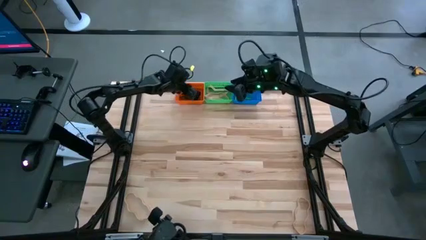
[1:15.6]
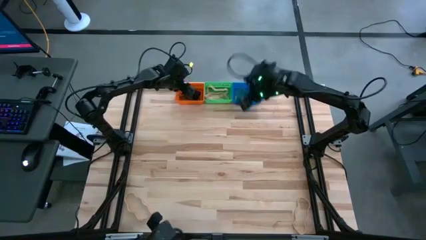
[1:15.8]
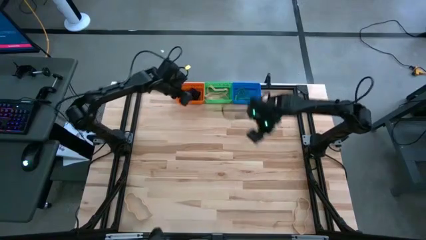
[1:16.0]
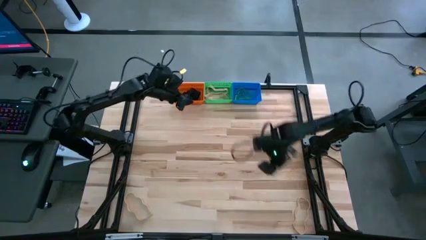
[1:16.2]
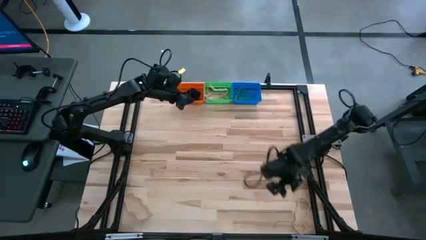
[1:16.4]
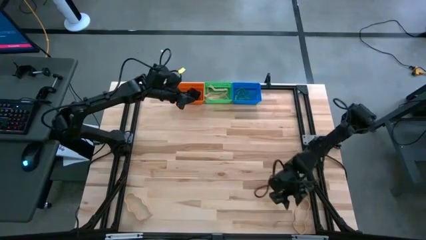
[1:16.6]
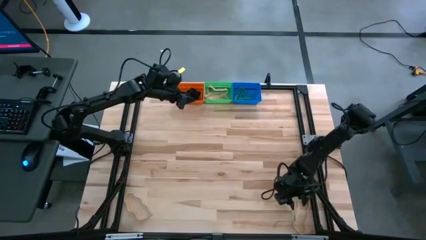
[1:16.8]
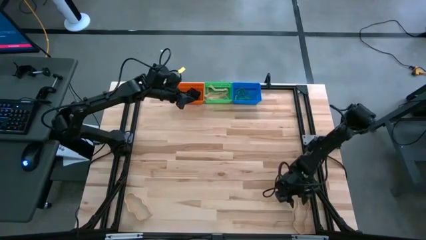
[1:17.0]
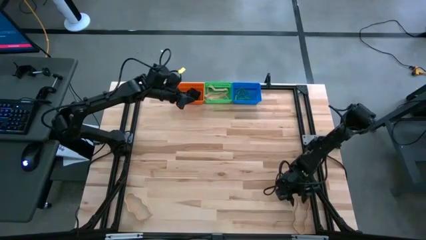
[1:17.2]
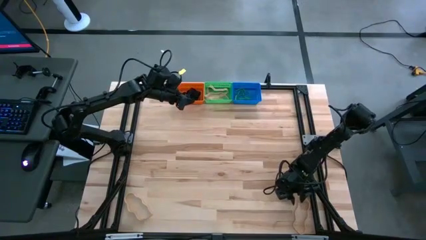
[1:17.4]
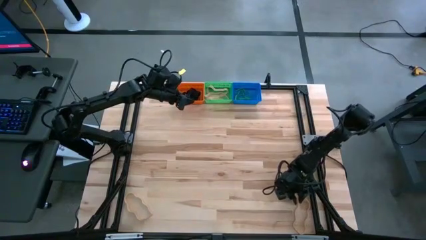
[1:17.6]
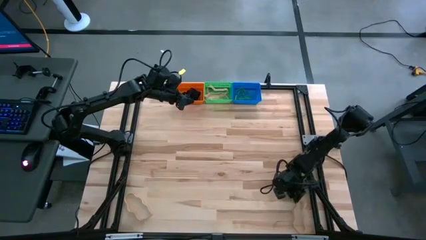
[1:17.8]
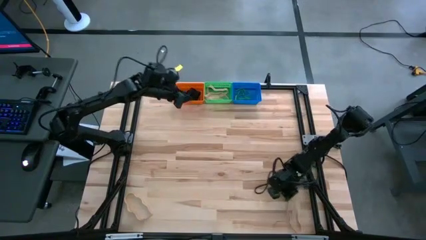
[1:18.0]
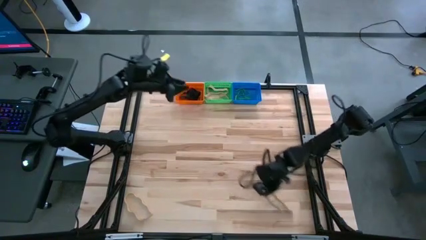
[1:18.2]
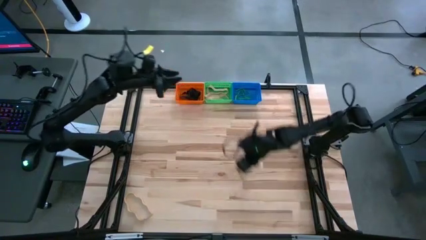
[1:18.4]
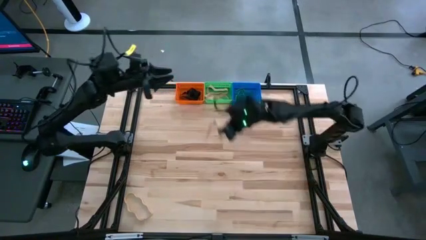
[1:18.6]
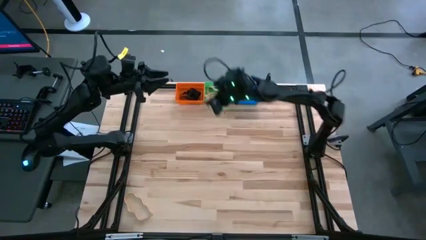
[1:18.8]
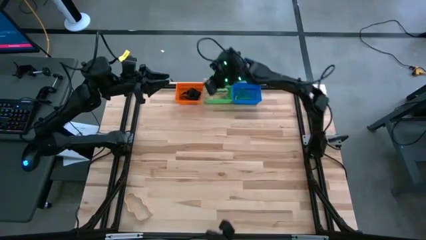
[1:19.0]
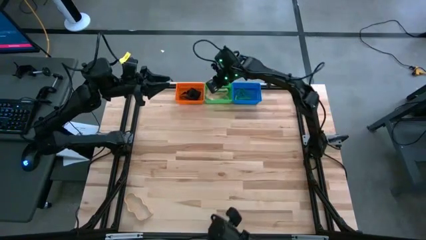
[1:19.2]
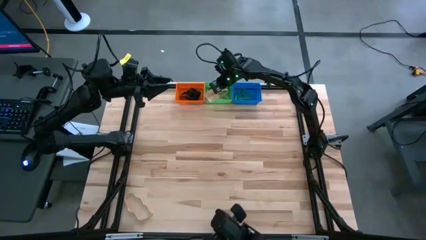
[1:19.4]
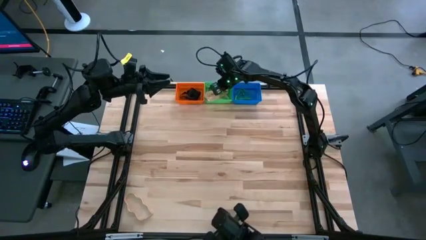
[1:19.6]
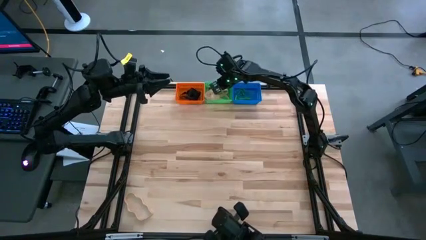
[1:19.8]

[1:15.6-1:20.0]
Task: Sort rubber bands into baskets
Put the white rubber band into the green basket

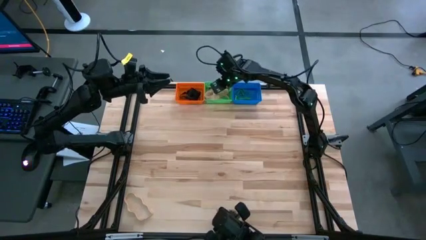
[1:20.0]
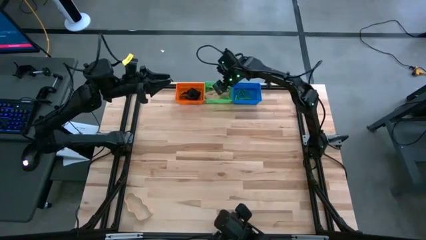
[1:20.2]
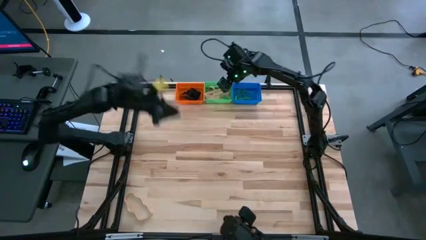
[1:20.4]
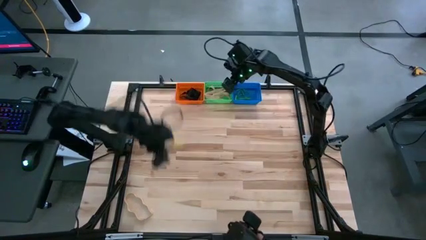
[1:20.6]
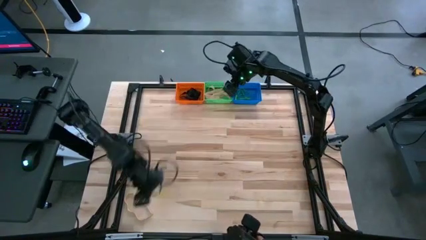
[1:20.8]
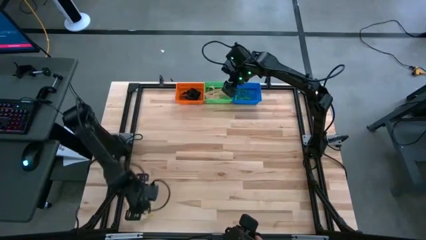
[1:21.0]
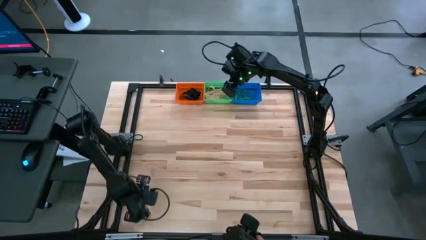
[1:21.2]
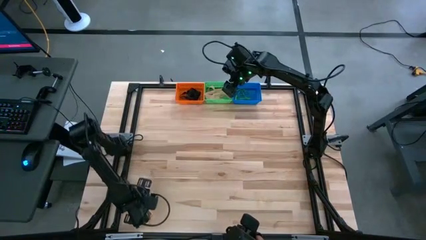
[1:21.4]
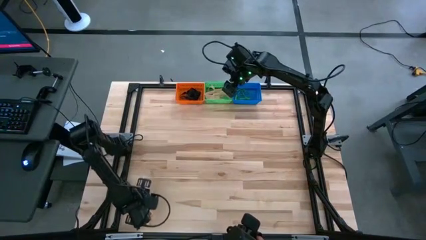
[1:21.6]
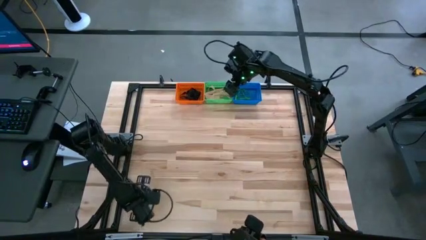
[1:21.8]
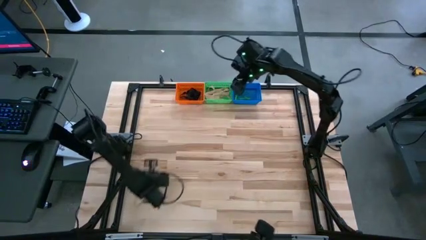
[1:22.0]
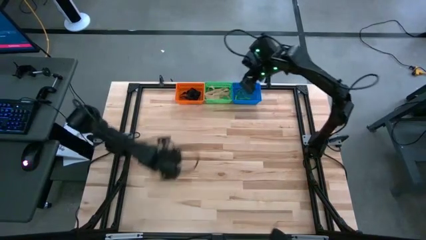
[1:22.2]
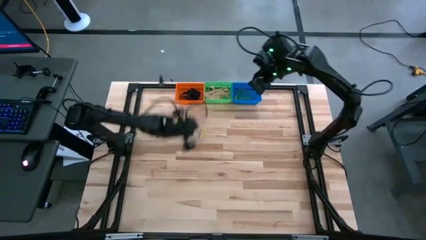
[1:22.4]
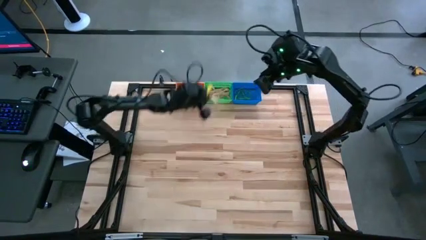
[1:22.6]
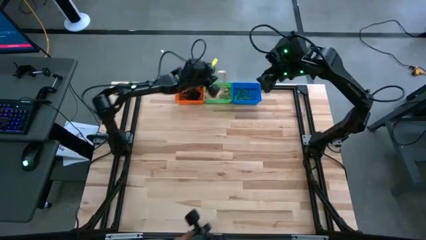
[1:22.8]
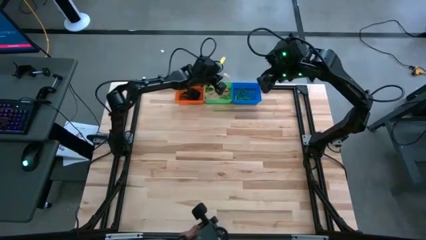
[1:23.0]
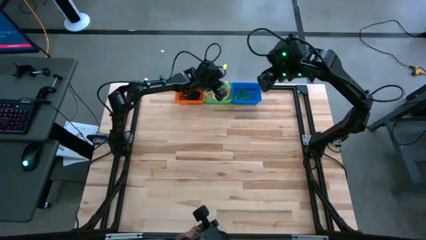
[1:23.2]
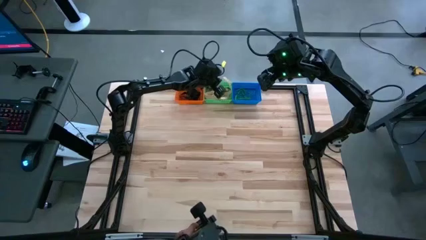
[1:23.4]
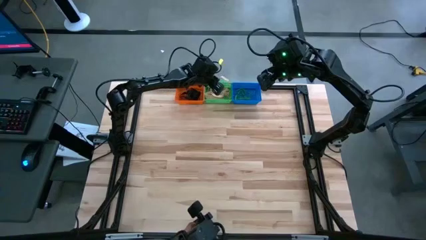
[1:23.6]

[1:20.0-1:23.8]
Put the white rubber band into the green basket

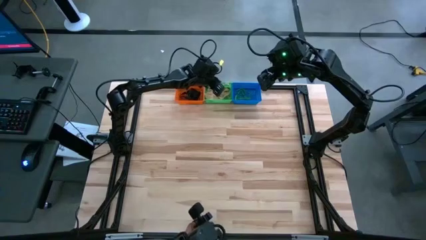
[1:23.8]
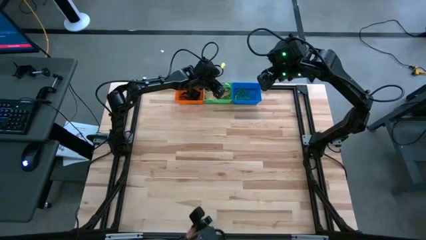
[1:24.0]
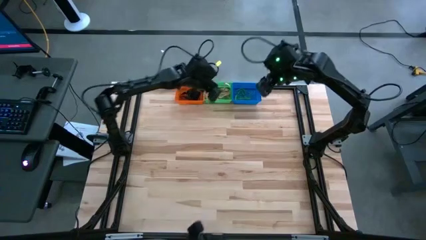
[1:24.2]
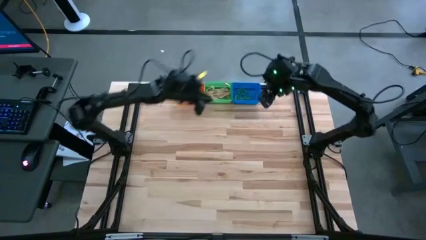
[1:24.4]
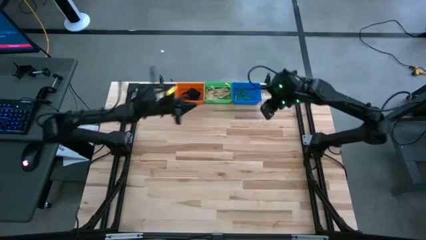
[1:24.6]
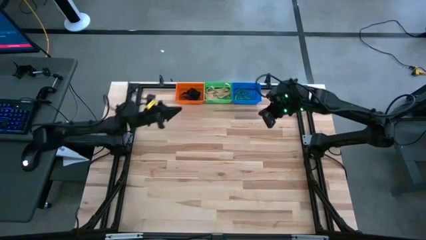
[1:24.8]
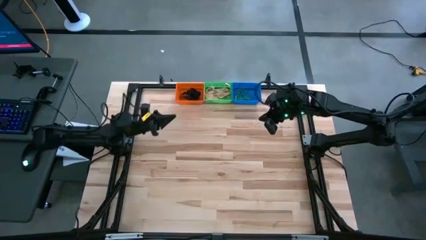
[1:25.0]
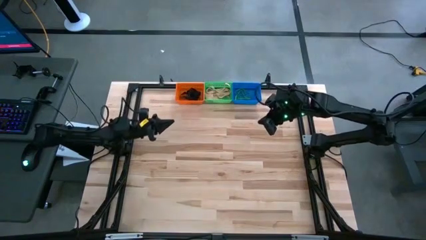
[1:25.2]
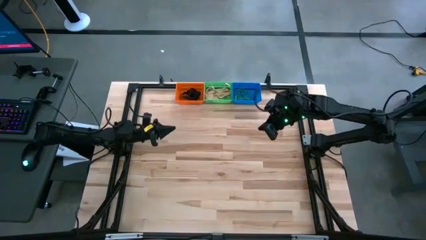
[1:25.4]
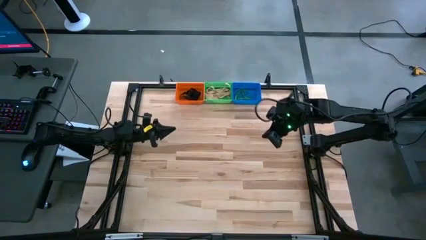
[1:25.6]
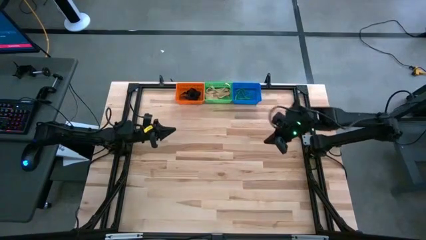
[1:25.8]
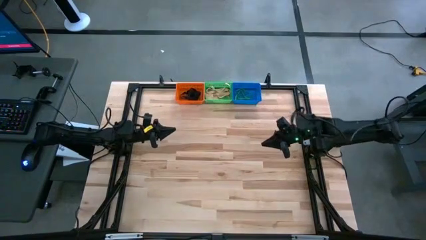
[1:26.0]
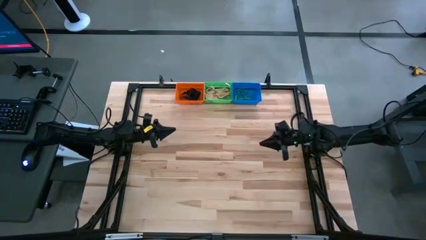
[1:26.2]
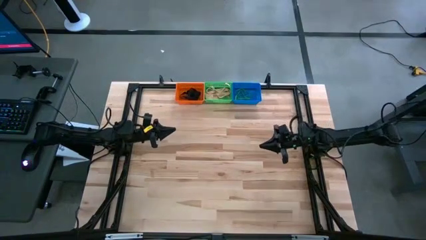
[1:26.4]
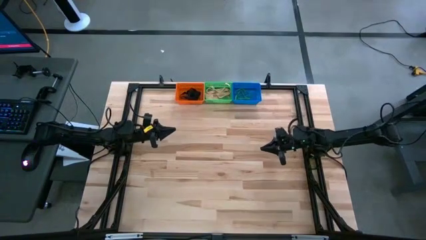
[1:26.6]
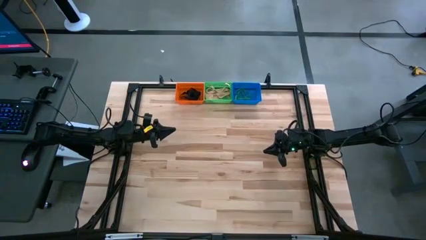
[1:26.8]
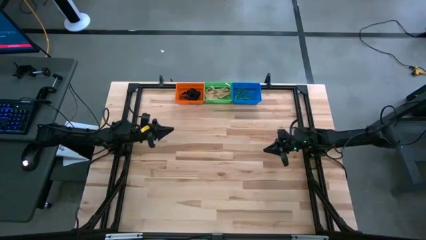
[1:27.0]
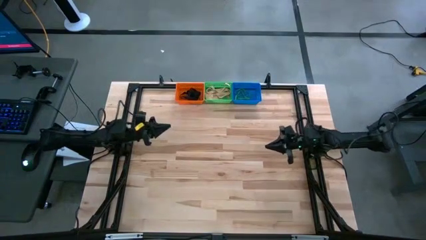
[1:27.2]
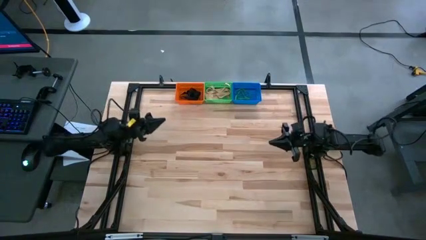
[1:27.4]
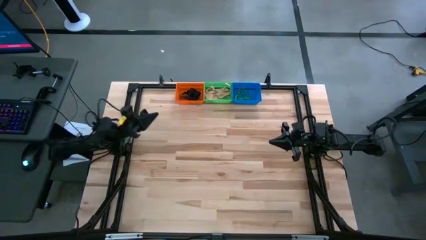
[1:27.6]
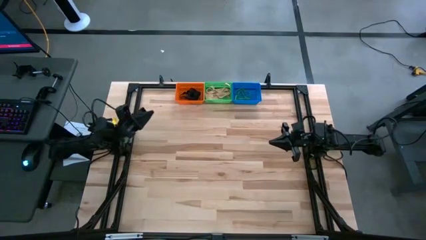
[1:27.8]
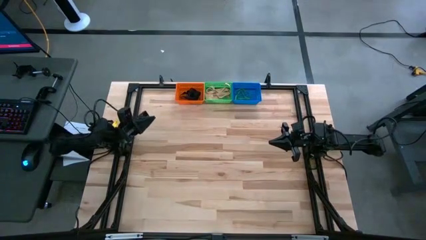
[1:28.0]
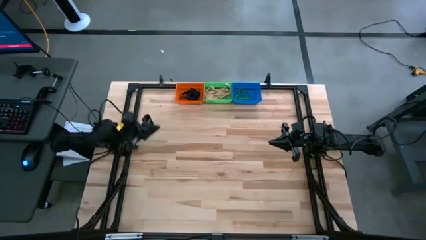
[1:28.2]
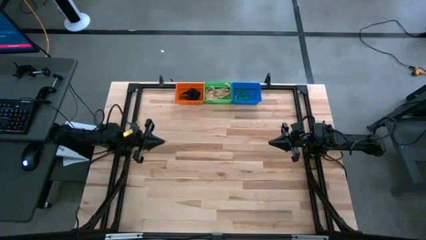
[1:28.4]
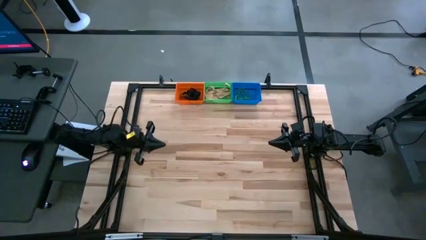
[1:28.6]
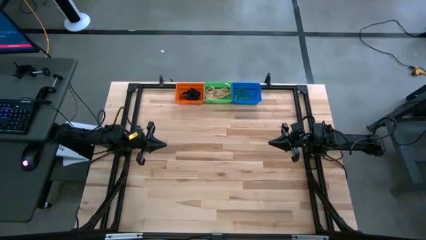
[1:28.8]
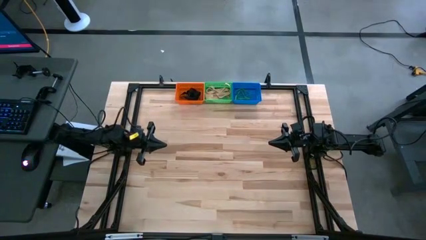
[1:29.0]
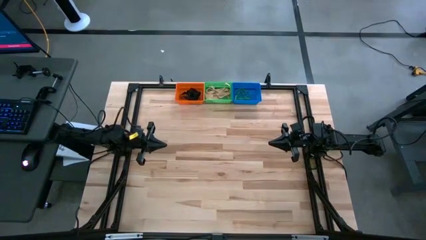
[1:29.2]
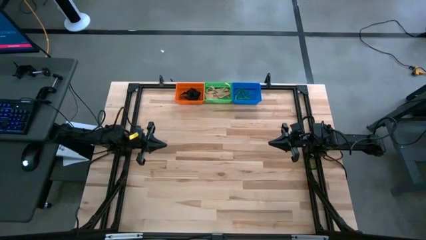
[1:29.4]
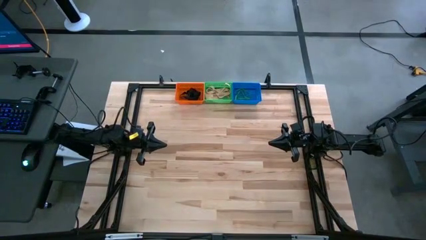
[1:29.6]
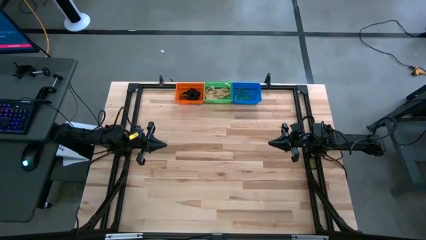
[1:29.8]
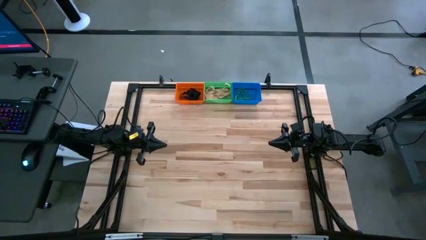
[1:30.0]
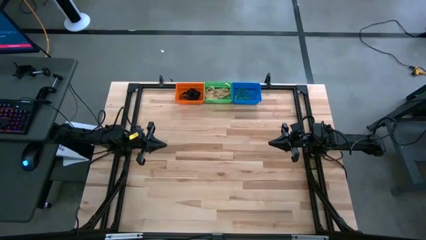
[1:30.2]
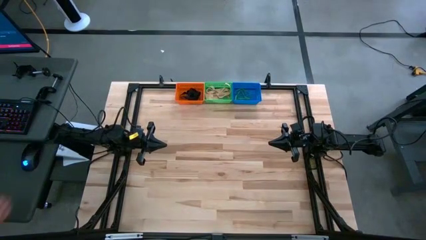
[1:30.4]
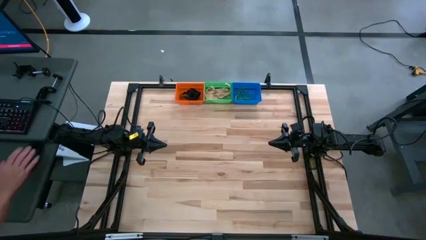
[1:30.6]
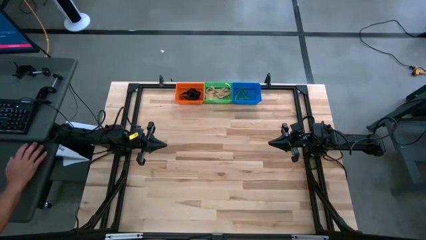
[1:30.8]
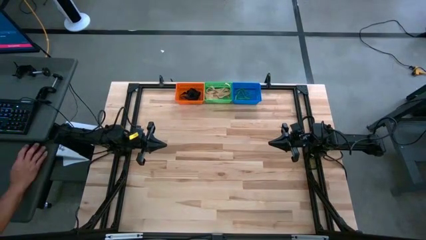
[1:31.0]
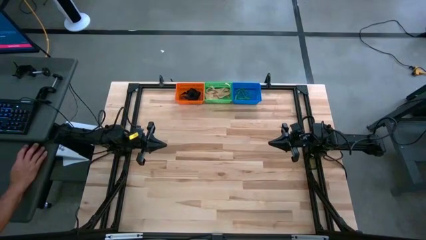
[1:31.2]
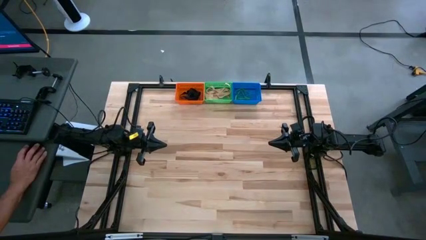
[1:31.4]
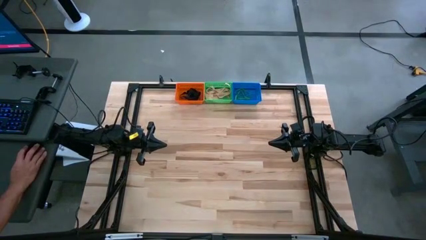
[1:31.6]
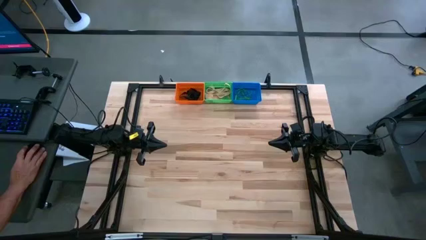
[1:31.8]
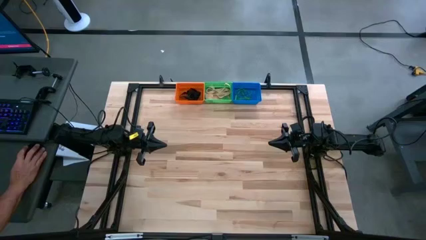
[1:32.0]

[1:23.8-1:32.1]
Return to Home Position
